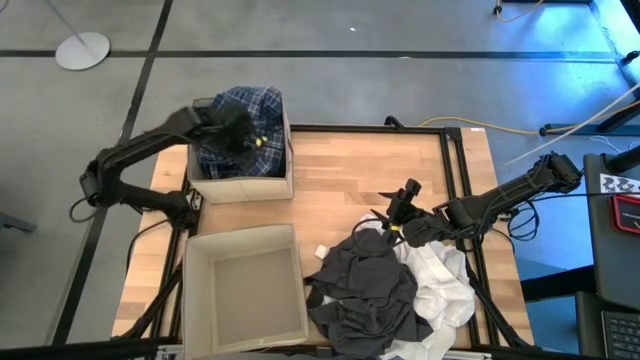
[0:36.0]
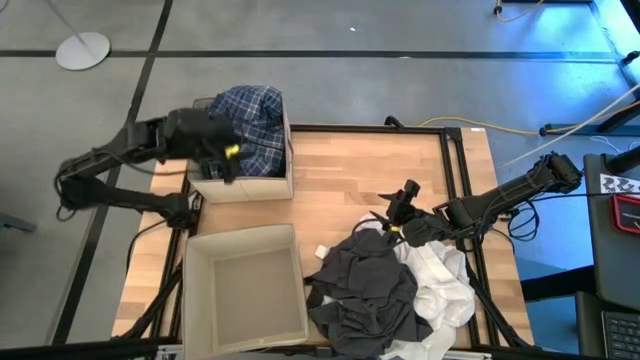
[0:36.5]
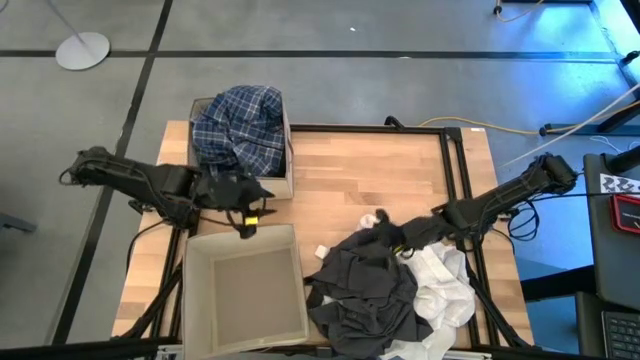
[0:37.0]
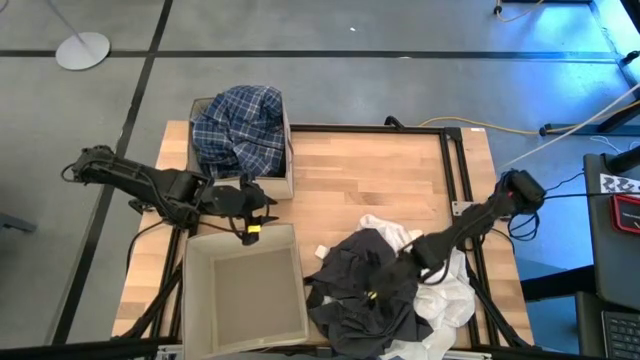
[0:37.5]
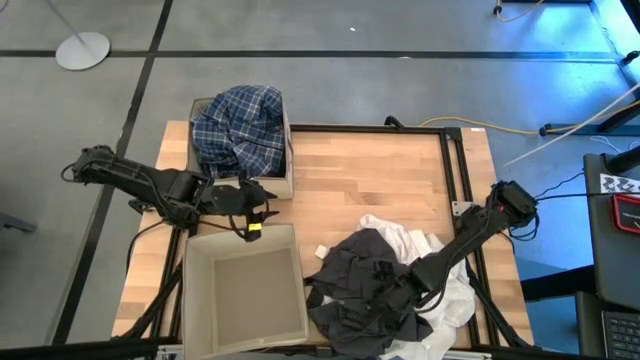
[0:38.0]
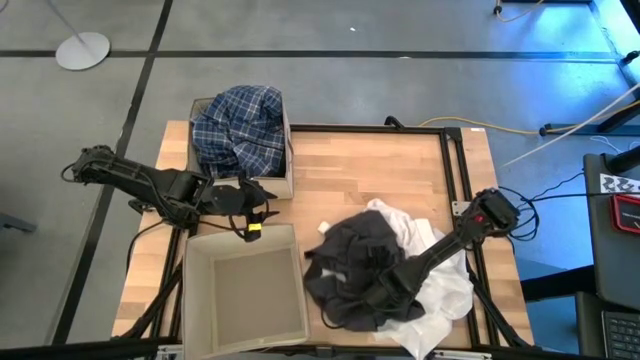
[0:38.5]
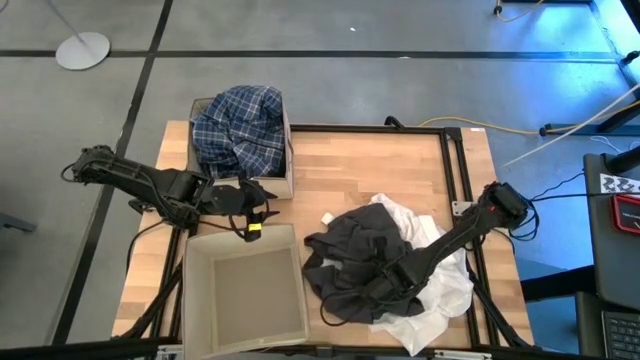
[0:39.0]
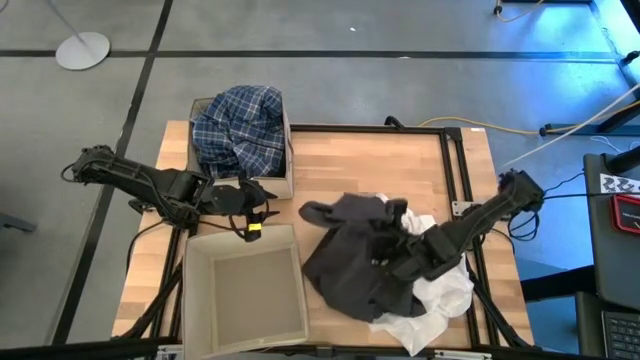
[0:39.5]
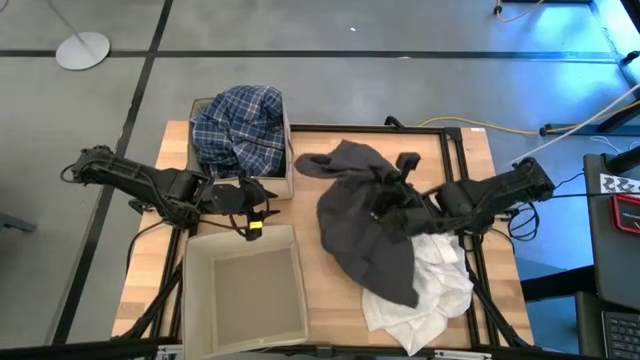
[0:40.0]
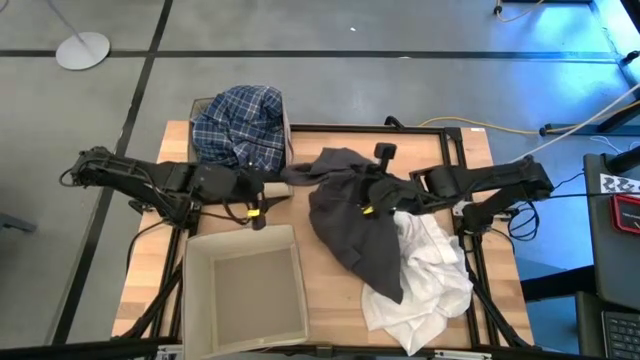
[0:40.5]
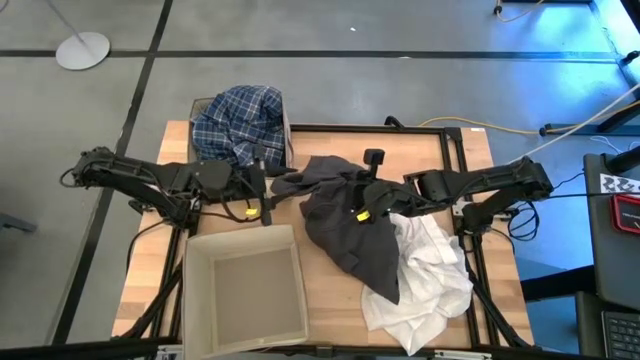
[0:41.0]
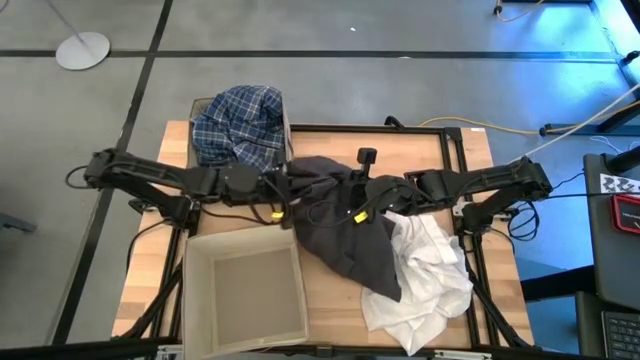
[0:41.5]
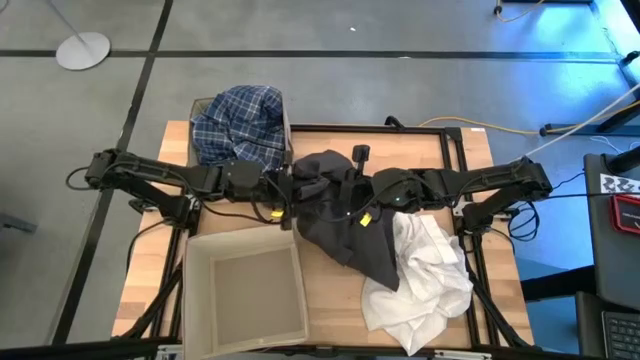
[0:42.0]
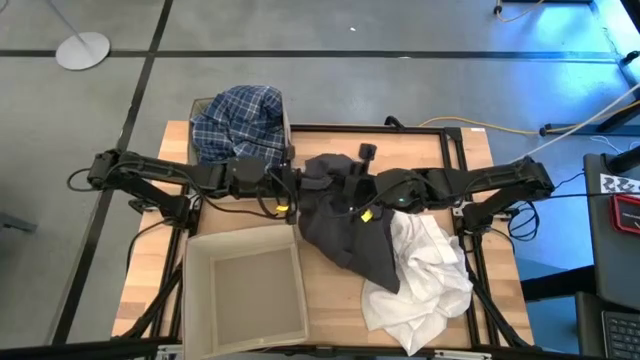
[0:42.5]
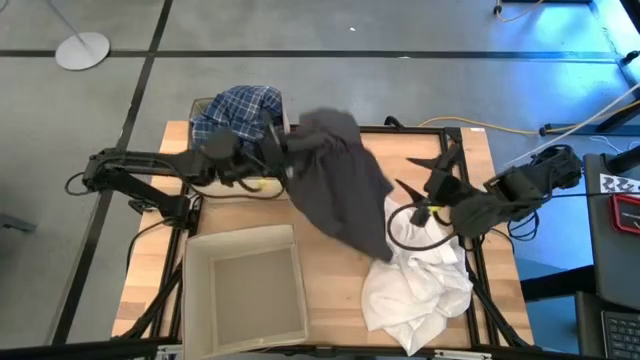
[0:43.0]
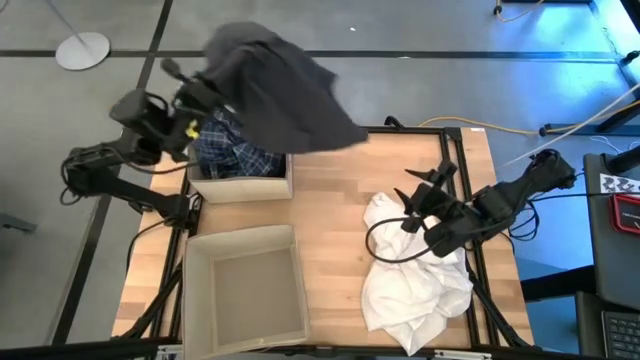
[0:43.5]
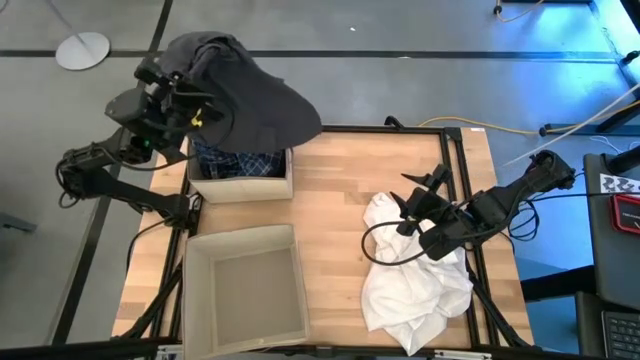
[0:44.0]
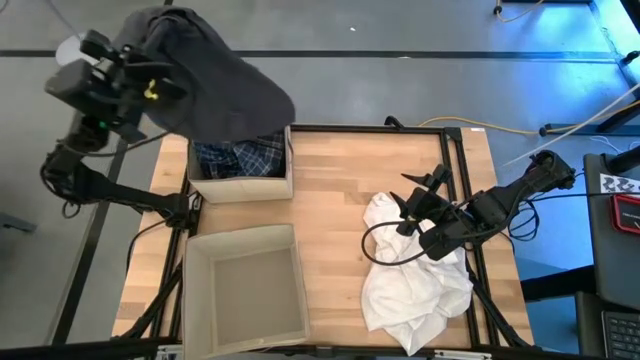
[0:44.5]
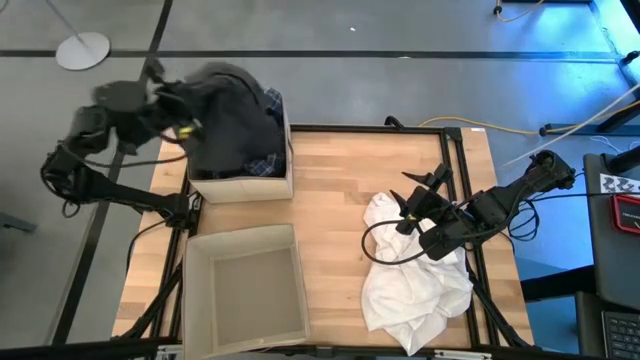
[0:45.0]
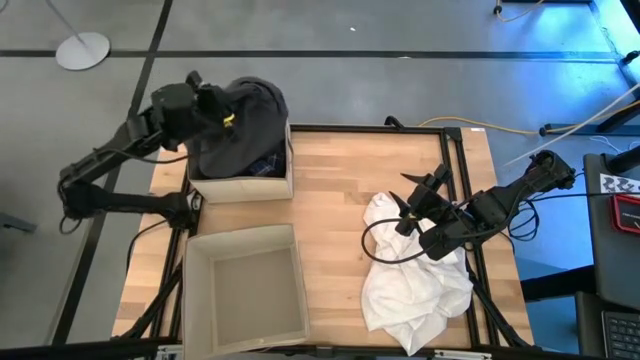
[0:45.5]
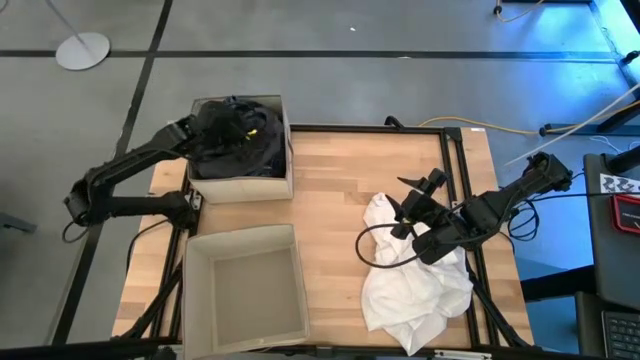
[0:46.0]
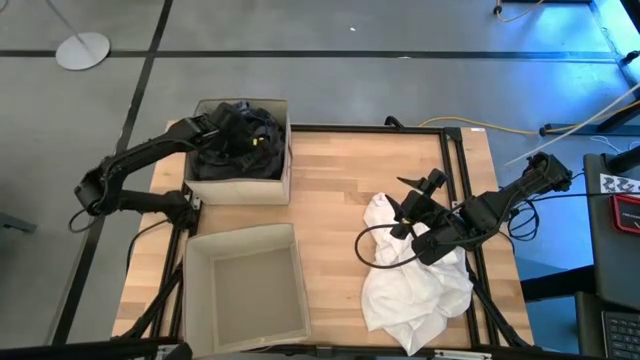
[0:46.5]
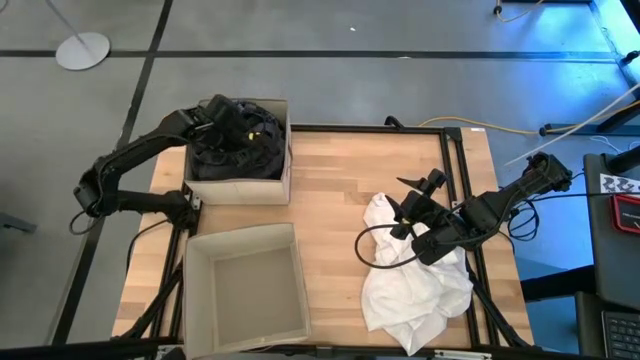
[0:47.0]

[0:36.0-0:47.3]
Task: Sort clothes
Put the gray shorts into the top laundry organizer

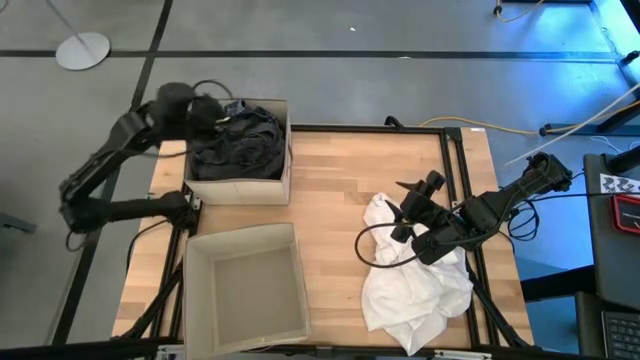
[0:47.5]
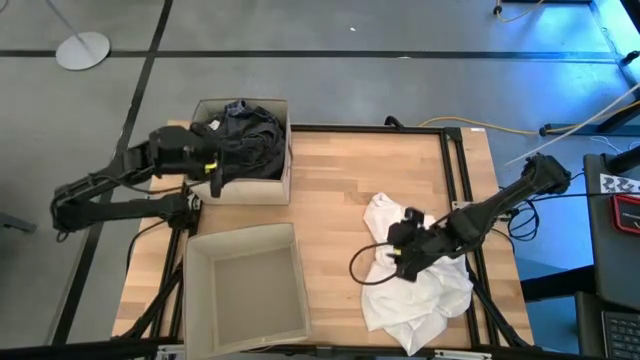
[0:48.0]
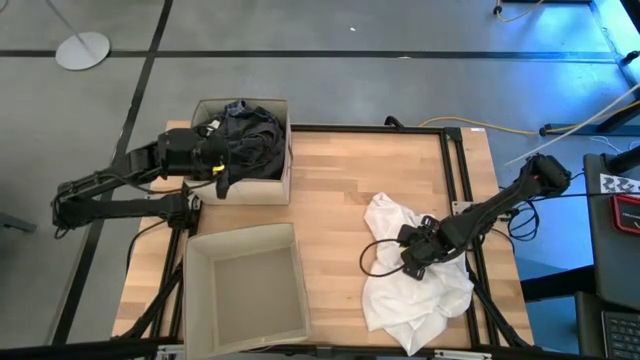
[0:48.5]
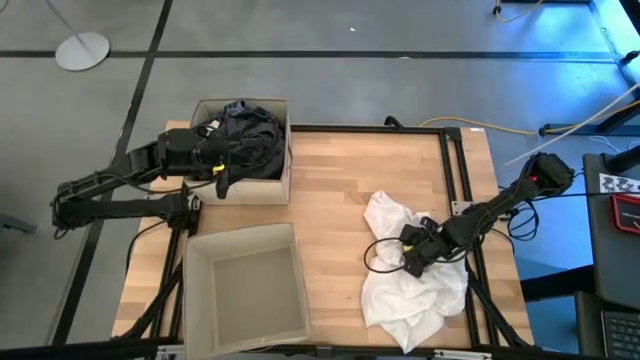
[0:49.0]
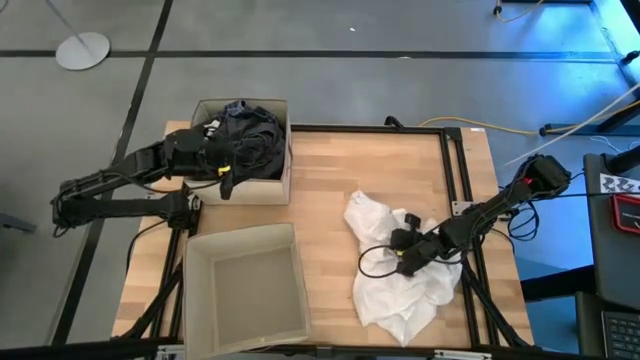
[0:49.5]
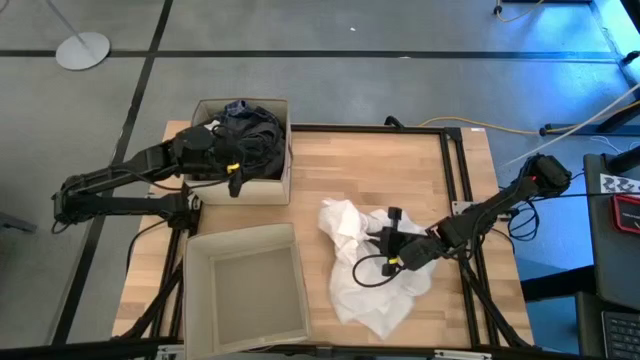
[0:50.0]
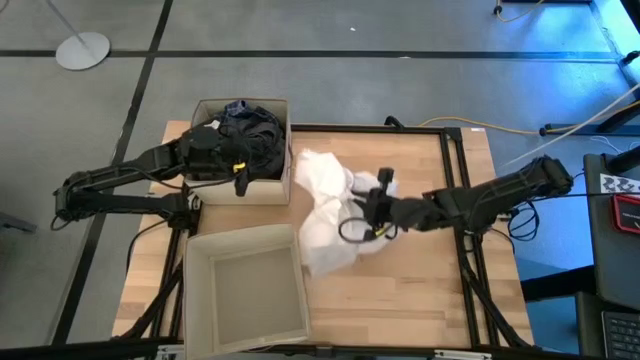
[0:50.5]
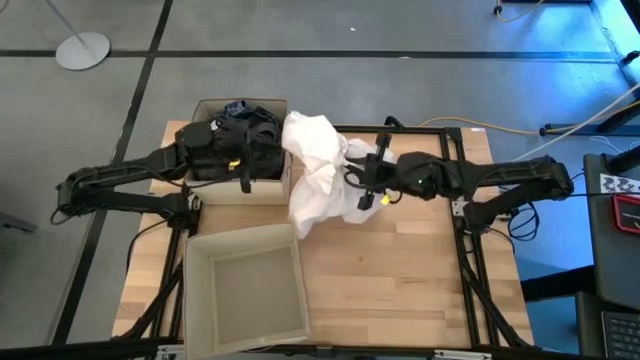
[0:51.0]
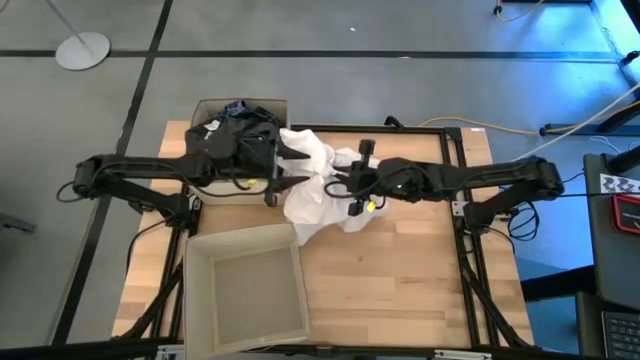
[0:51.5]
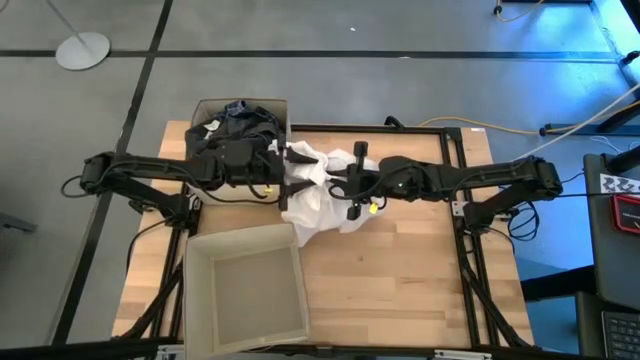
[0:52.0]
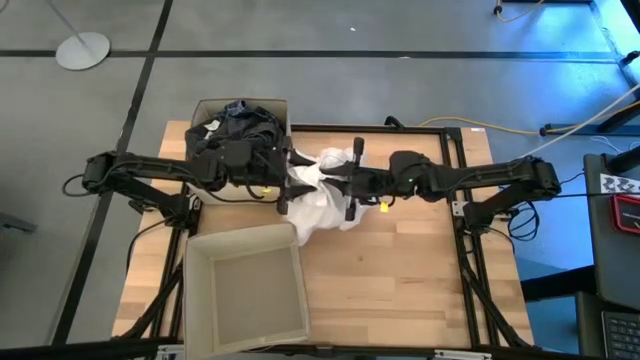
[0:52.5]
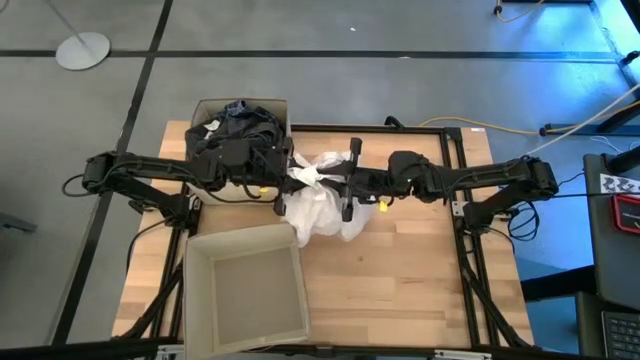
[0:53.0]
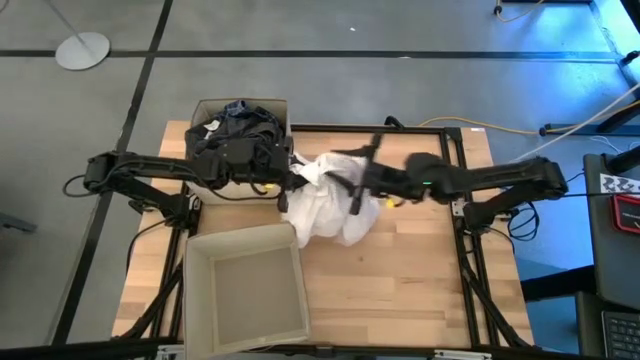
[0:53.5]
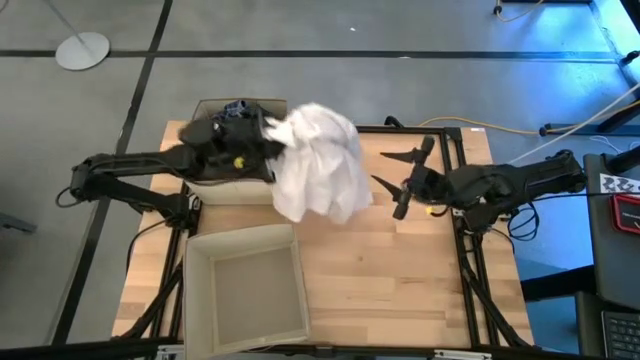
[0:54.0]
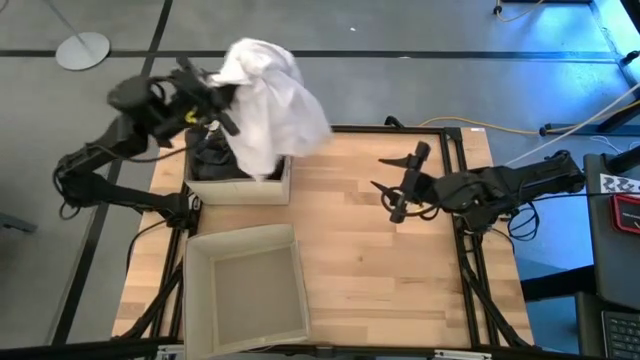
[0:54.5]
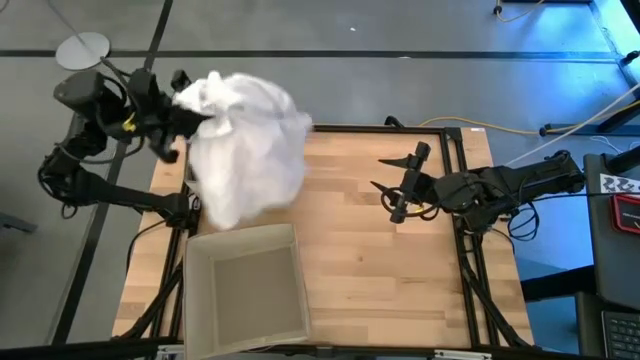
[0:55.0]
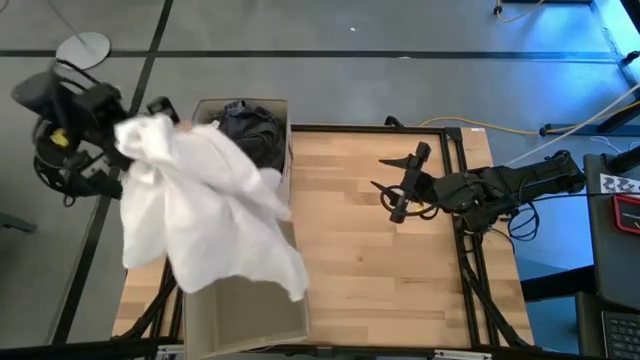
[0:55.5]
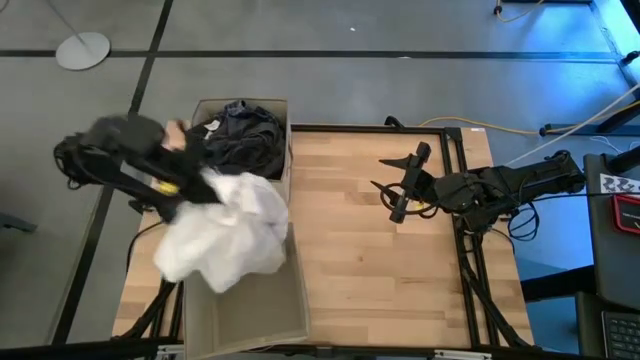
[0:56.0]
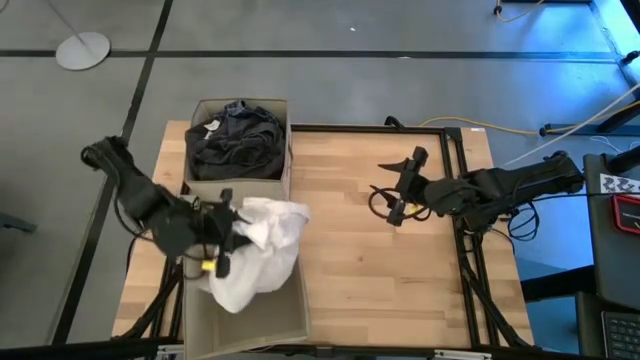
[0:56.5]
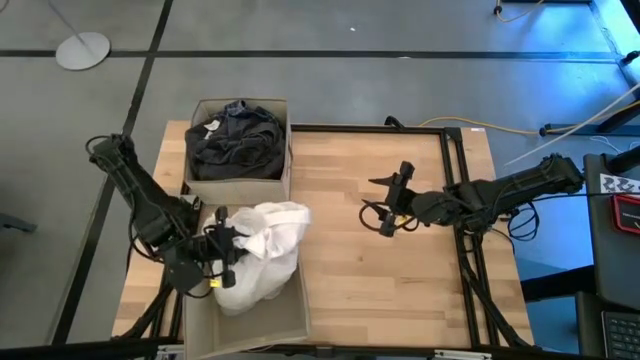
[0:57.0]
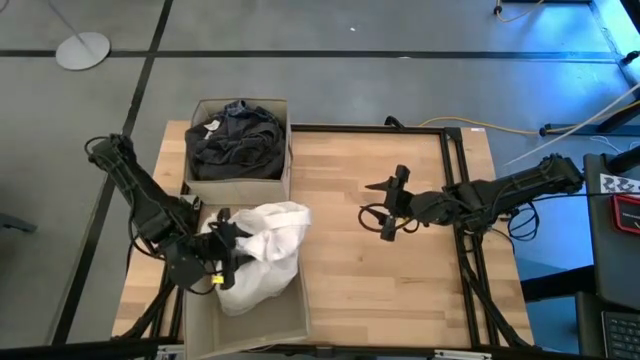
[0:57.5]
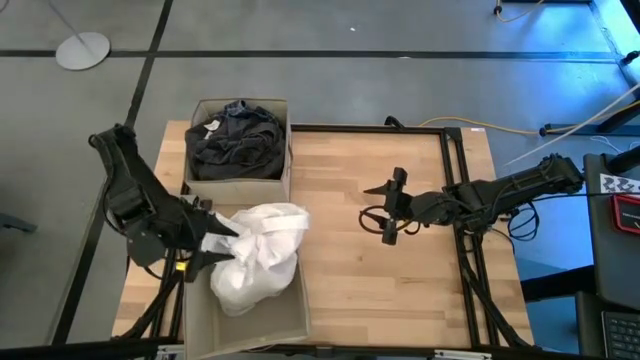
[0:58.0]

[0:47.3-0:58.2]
Put the white long sleeve shirt into the bottom laundry organizer
